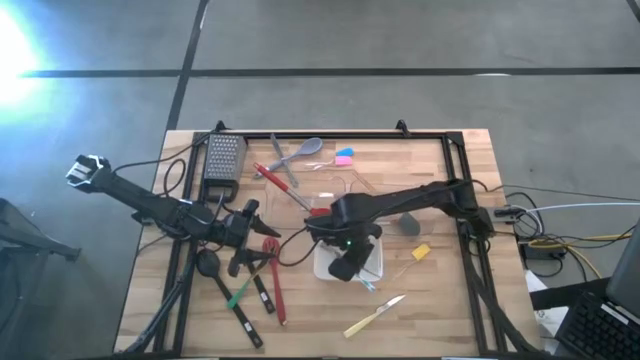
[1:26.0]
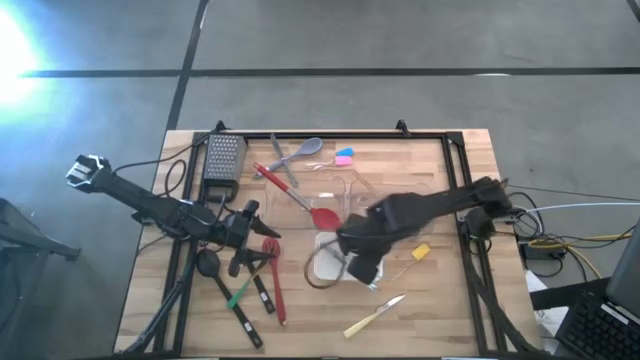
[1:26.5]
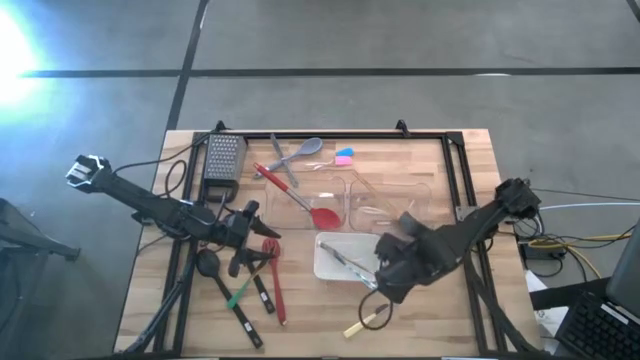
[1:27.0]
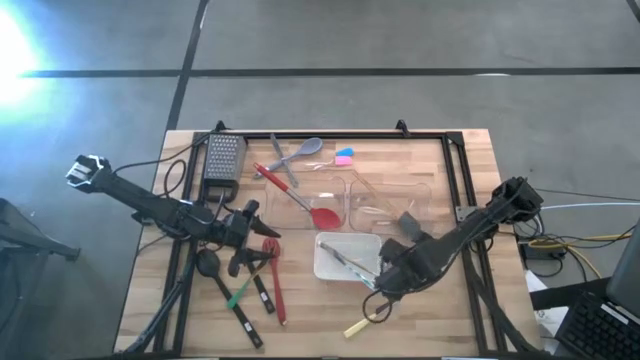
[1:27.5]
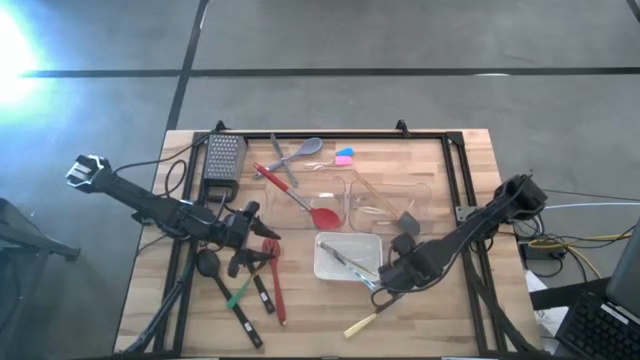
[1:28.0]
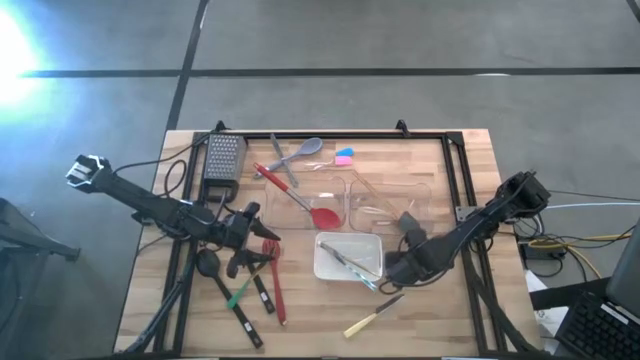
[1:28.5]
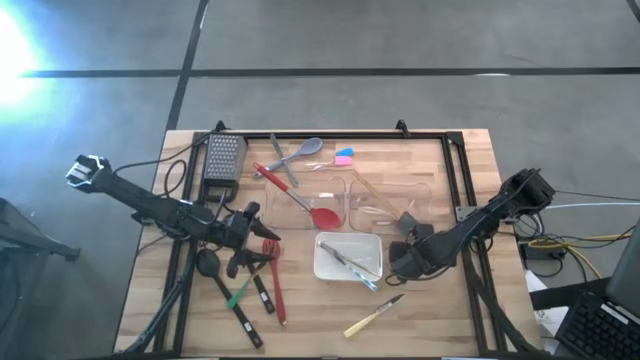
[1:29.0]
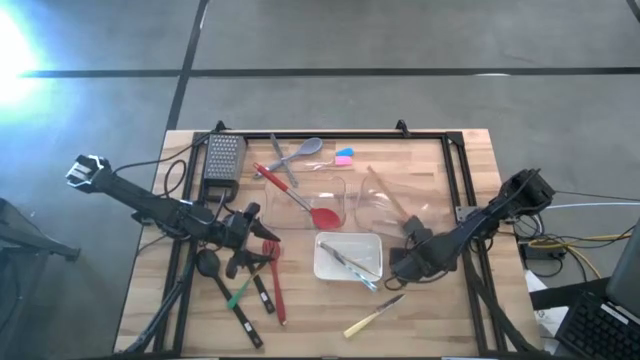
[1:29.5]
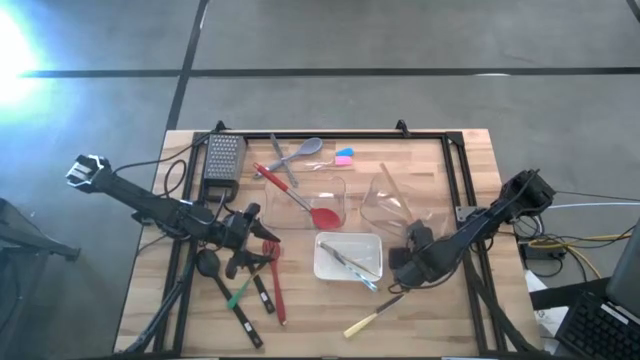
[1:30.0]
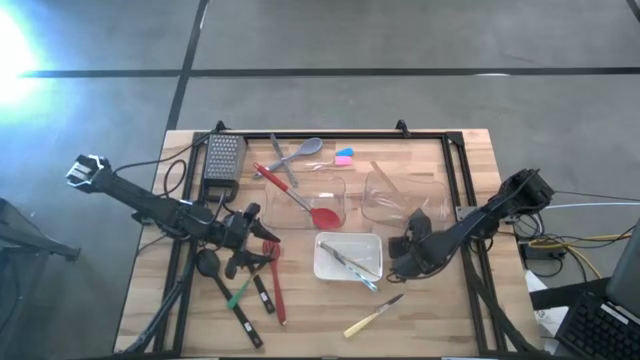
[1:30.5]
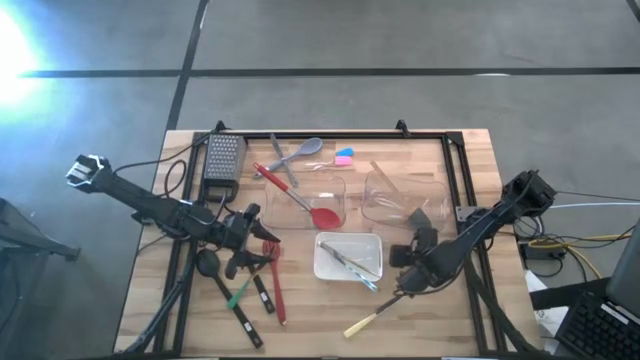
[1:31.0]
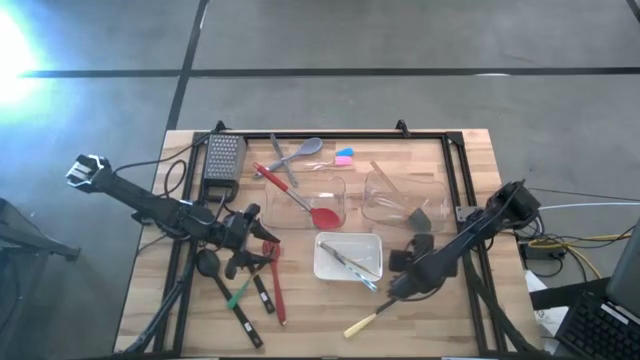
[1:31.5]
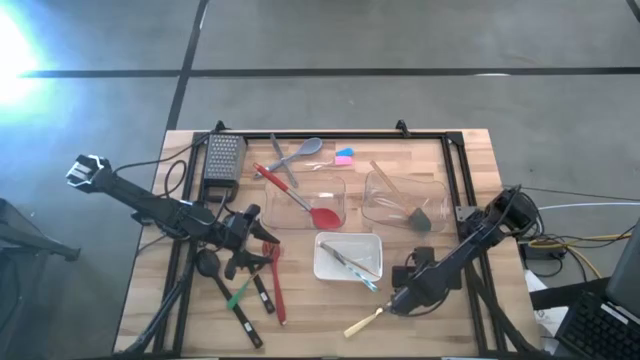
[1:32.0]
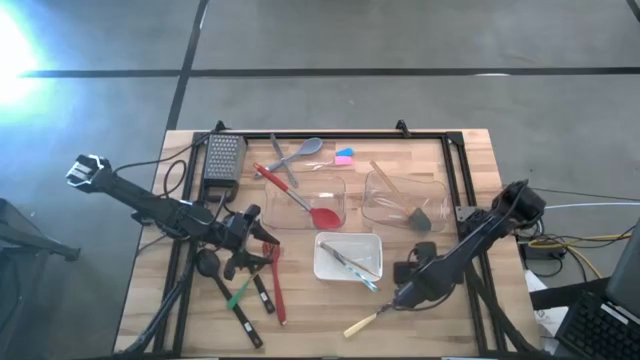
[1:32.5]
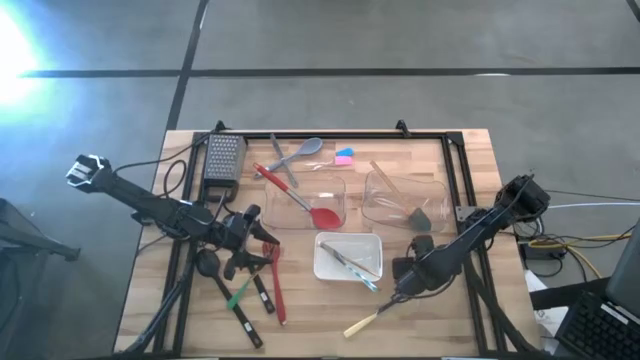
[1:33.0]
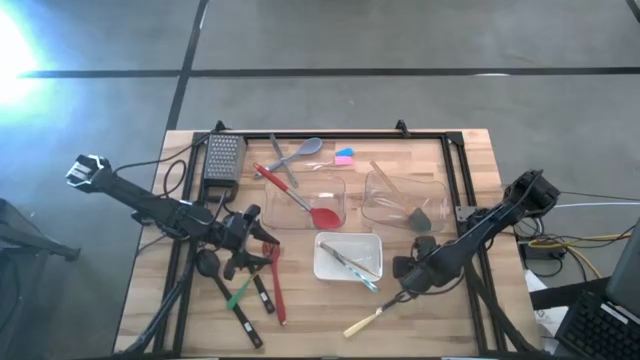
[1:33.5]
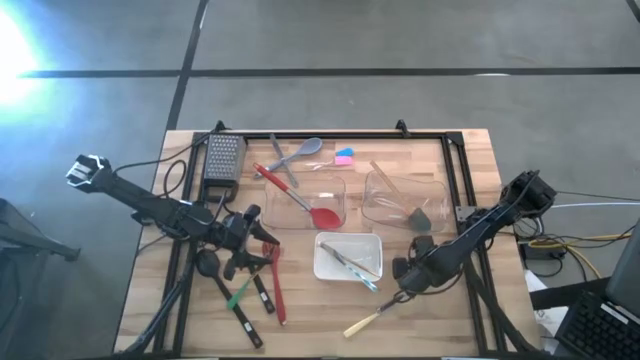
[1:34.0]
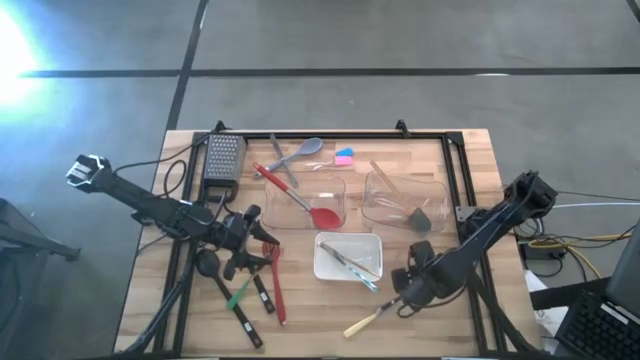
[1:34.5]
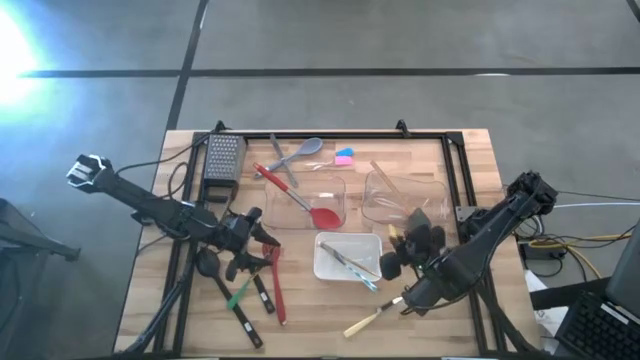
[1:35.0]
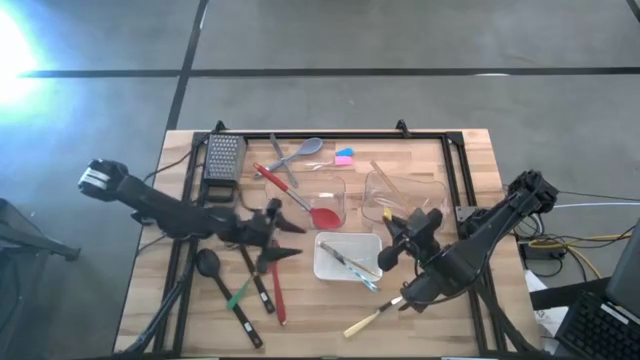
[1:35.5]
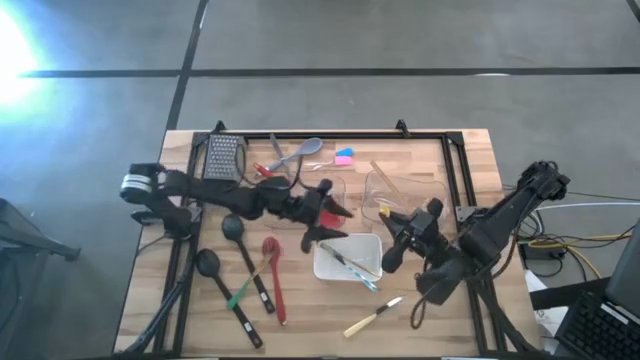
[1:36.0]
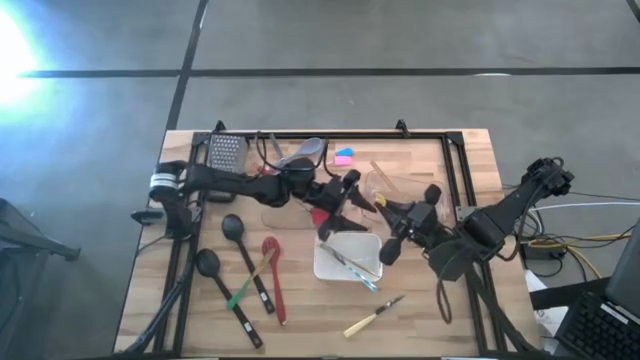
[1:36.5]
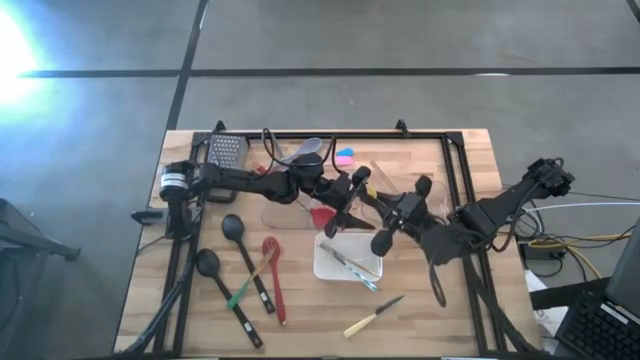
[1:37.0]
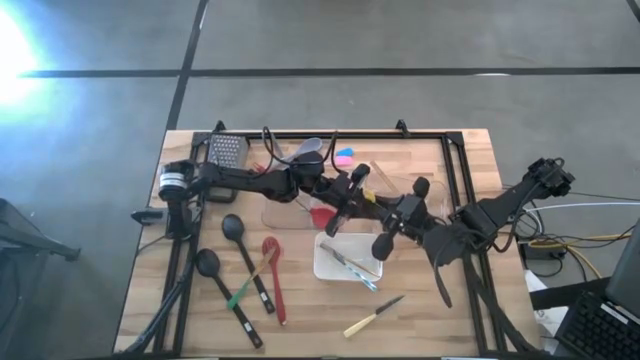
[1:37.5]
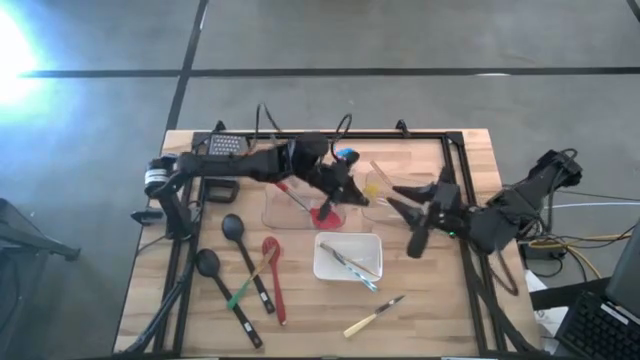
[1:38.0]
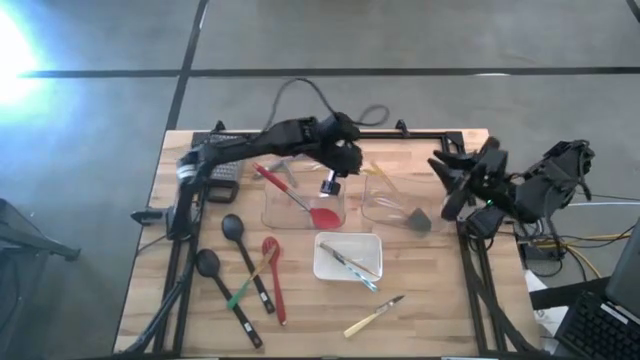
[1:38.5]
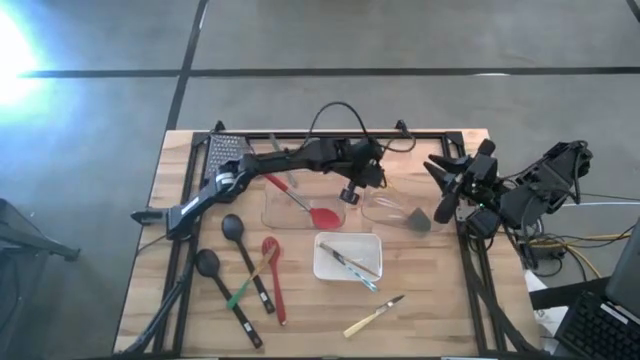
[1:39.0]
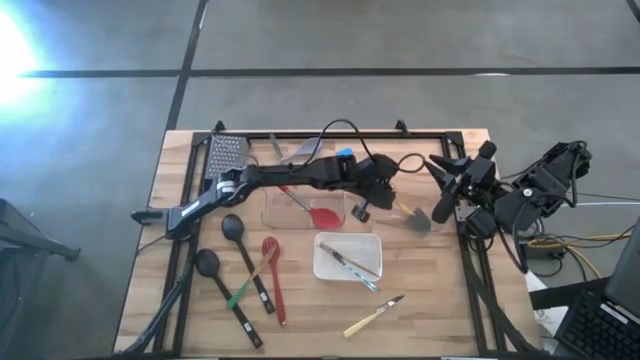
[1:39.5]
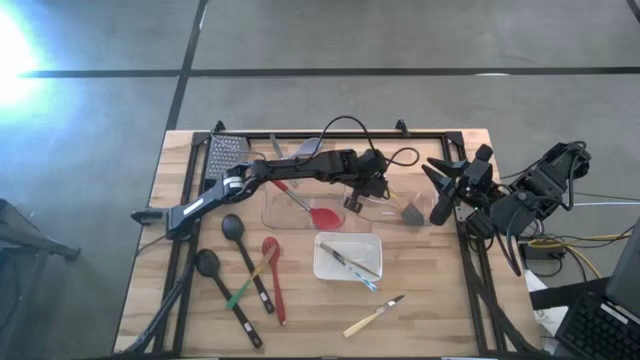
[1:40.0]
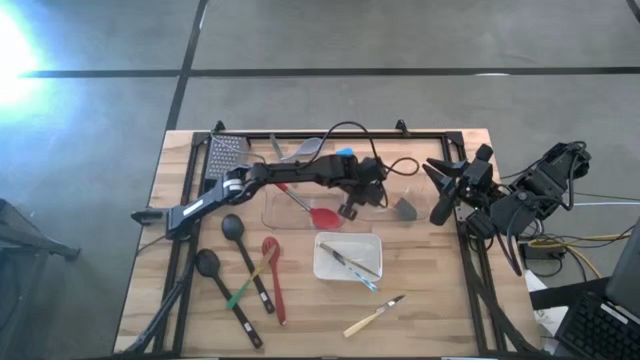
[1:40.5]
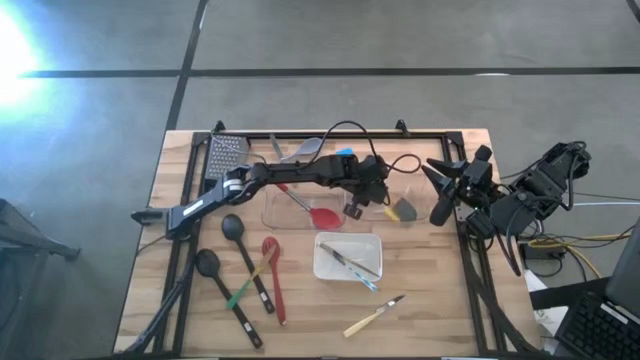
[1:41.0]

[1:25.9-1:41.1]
Task: Pick & Place Kitchen Items
Put the yellow spatula into the right transparent bin

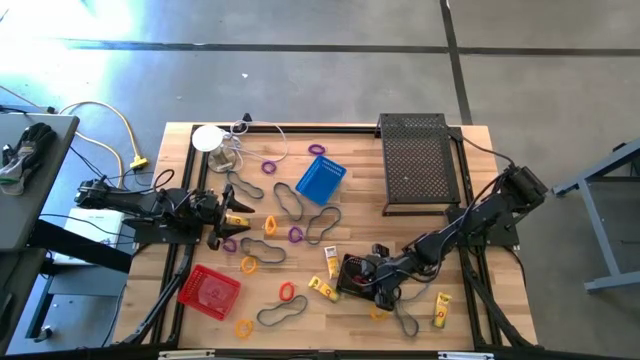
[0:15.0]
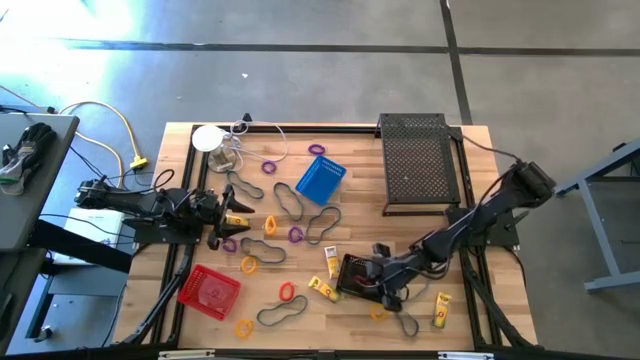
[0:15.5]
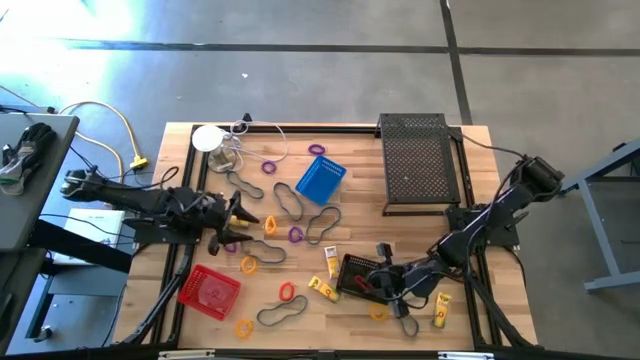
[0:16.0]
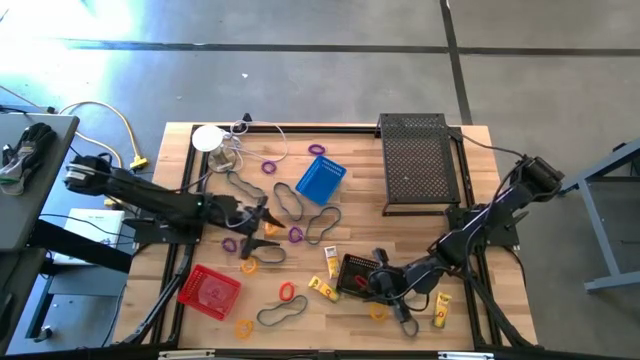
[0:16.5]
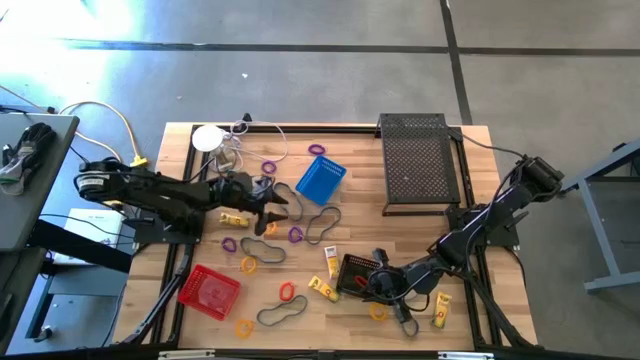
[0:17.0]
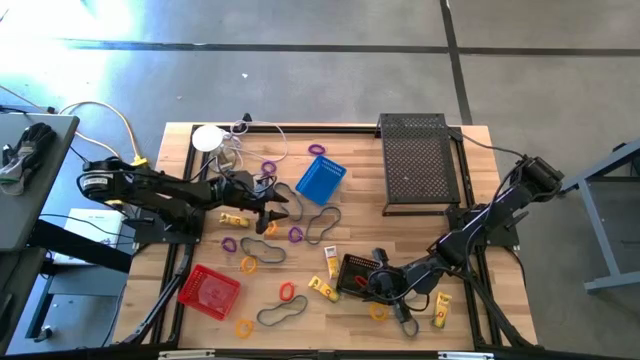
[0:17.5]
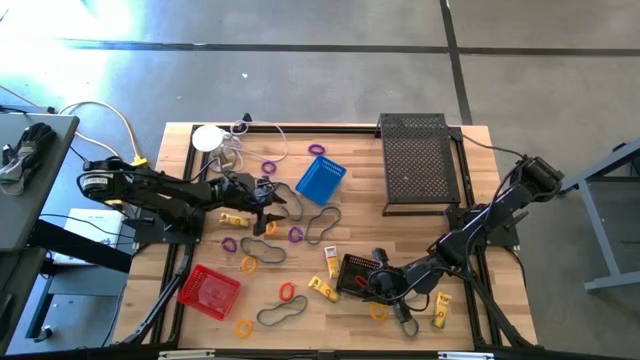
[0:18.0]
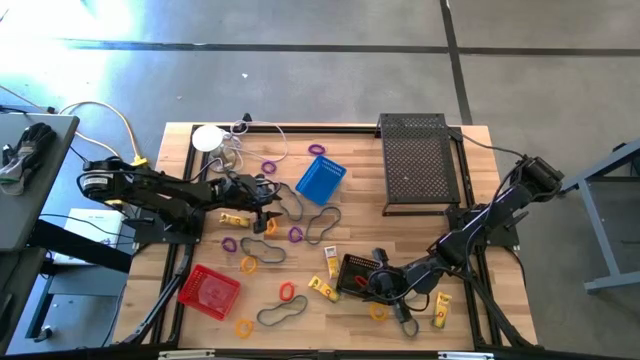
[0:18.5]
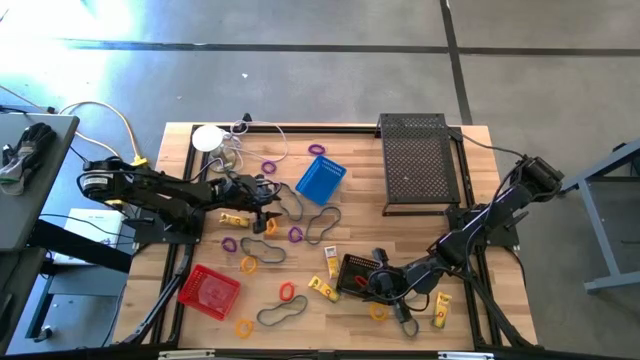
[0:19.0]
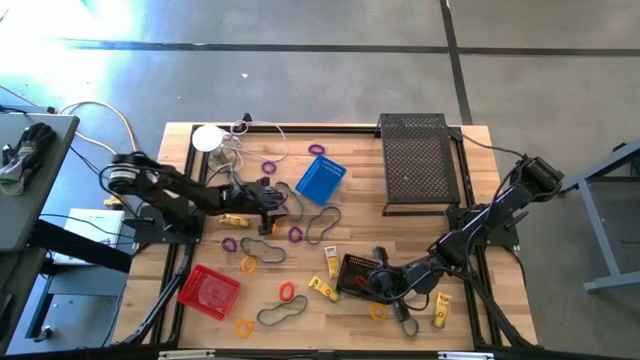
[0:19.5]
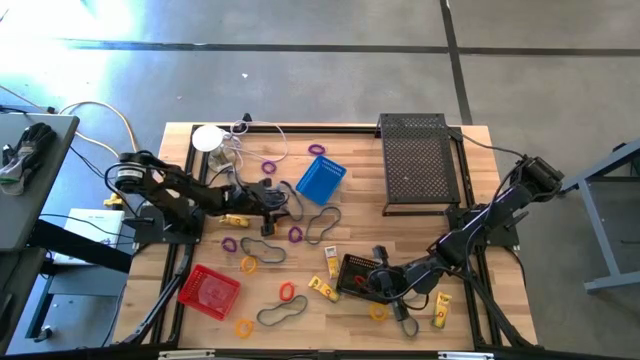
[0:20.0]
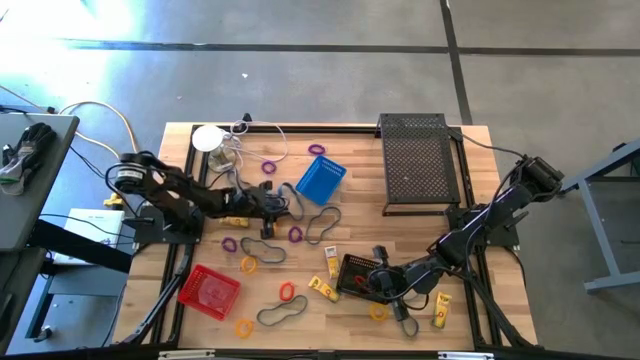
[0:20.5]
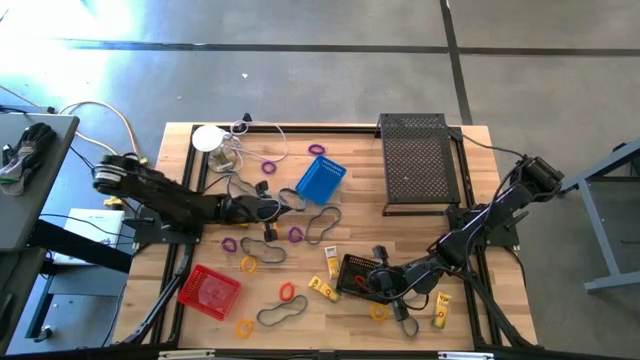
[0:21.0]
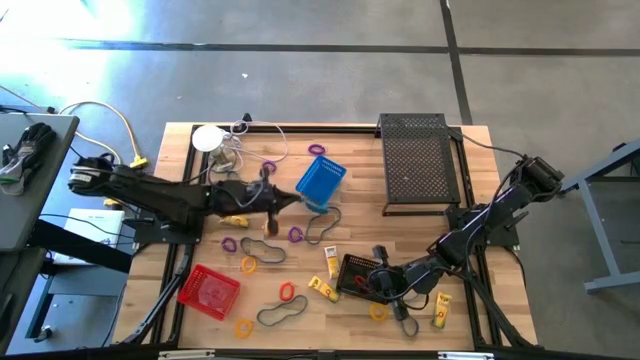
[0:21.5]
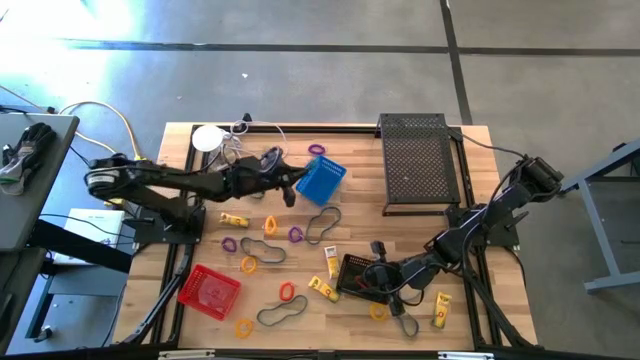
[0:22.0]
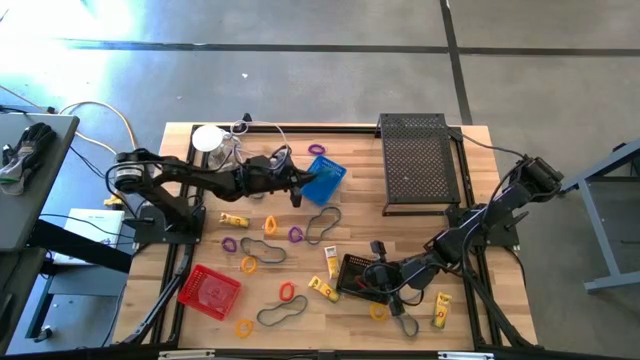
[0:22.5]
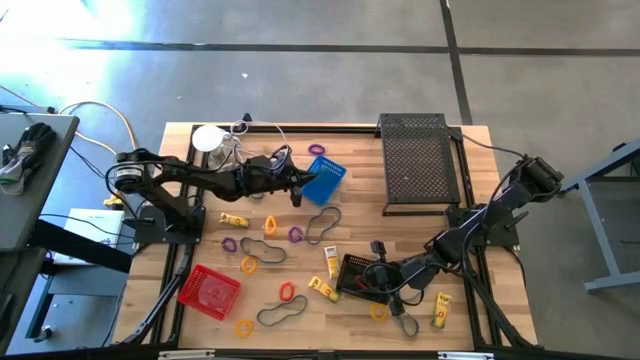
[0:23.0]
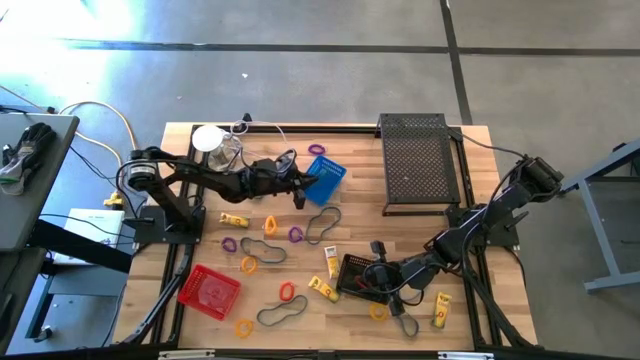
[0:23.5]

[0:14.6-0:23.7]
Task: Pick & Place Office Desk Supplies
Put the blue rubber band into the blue bin
